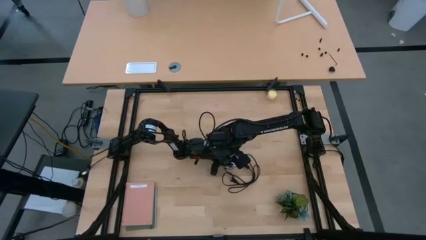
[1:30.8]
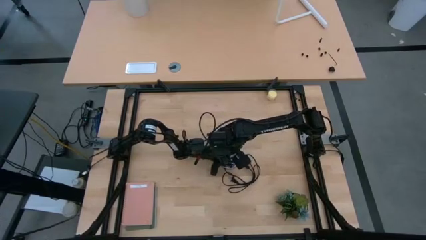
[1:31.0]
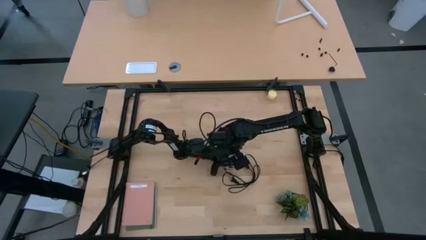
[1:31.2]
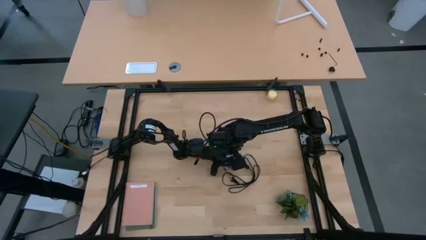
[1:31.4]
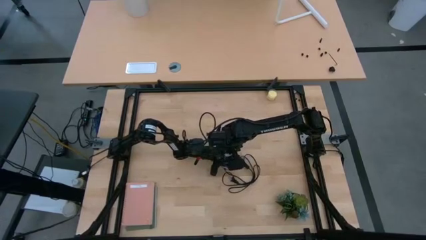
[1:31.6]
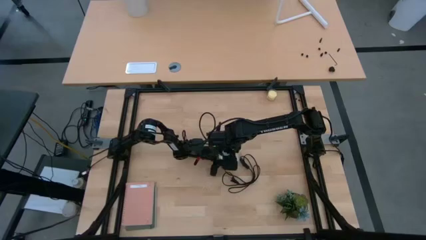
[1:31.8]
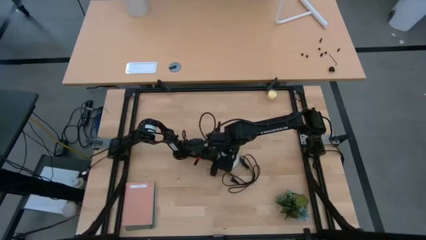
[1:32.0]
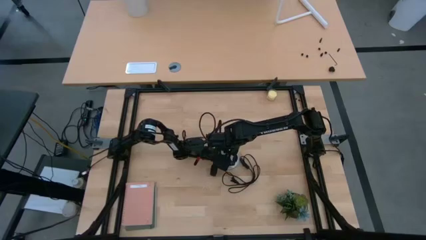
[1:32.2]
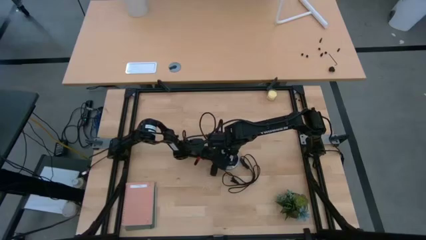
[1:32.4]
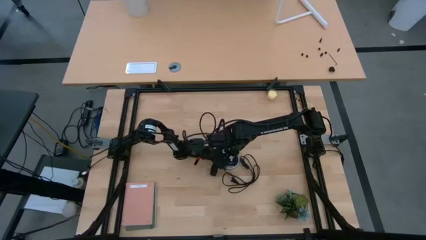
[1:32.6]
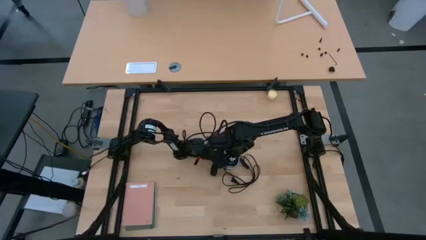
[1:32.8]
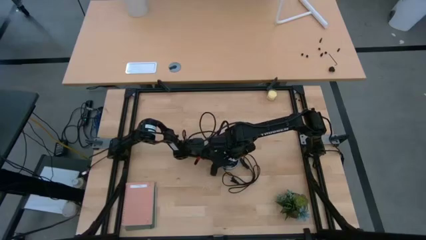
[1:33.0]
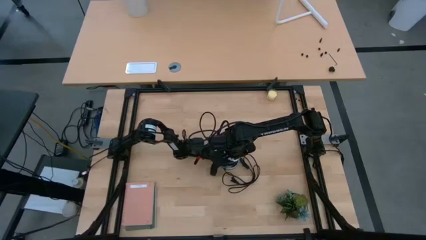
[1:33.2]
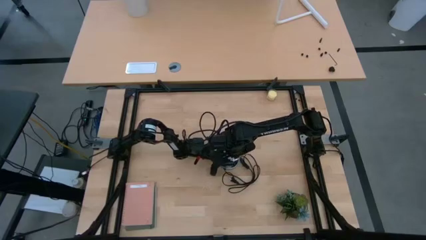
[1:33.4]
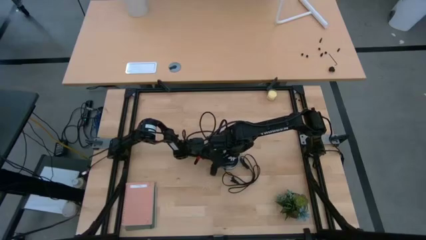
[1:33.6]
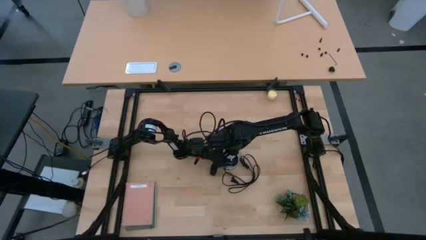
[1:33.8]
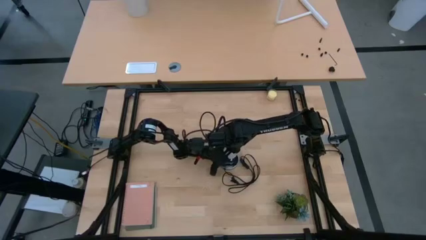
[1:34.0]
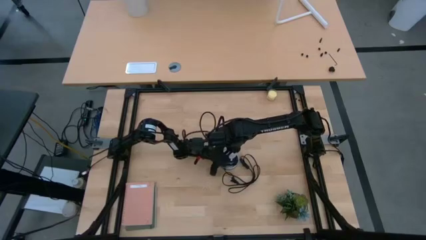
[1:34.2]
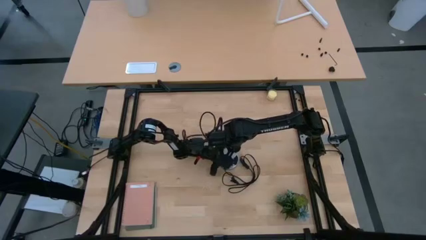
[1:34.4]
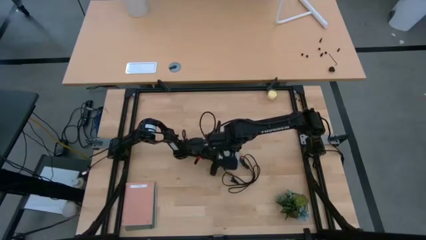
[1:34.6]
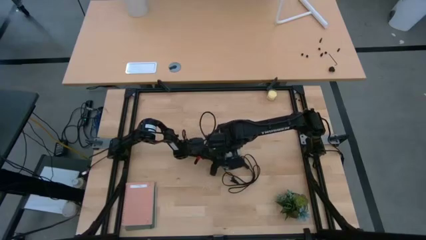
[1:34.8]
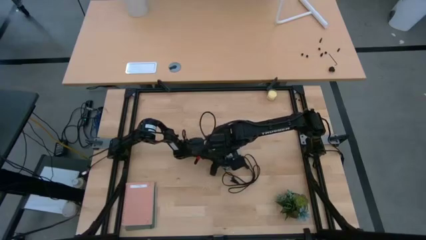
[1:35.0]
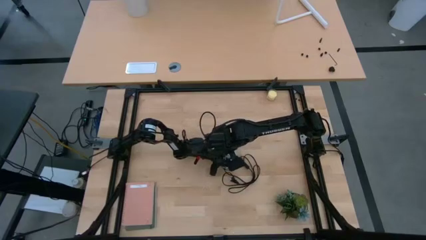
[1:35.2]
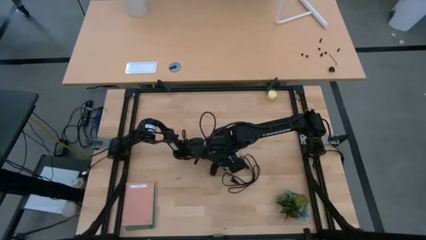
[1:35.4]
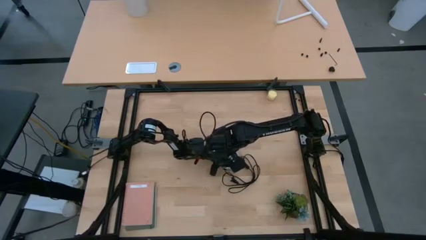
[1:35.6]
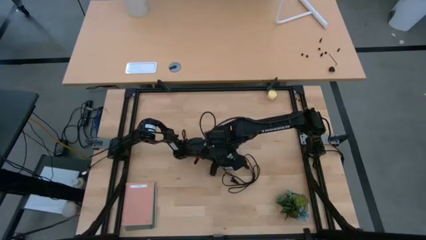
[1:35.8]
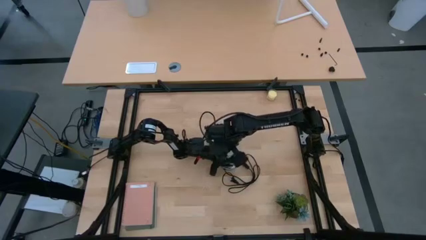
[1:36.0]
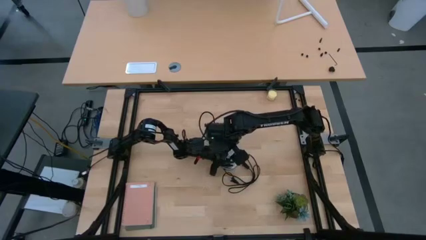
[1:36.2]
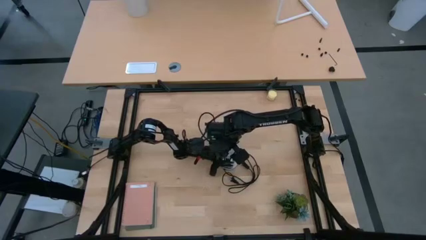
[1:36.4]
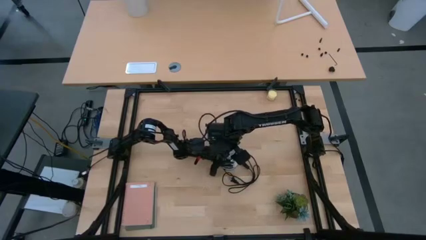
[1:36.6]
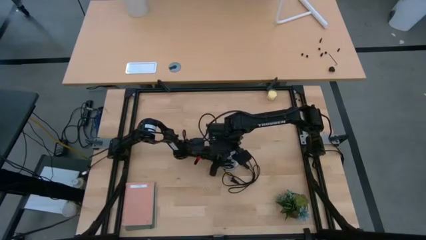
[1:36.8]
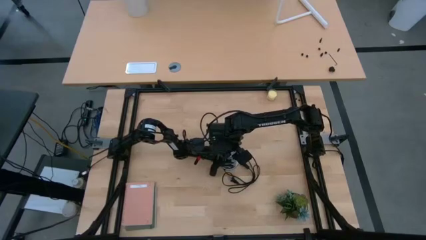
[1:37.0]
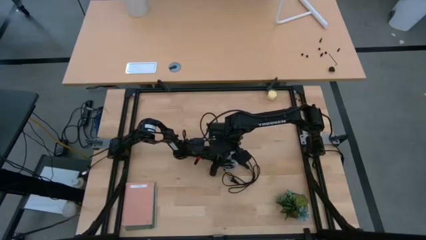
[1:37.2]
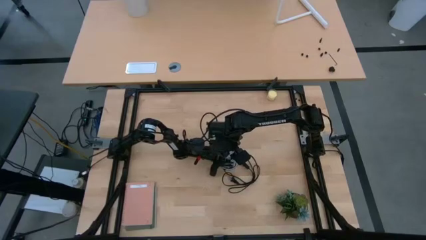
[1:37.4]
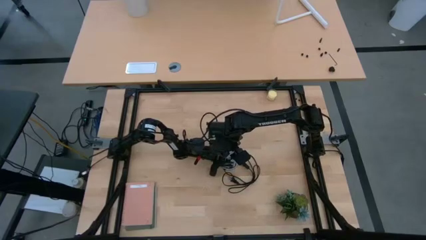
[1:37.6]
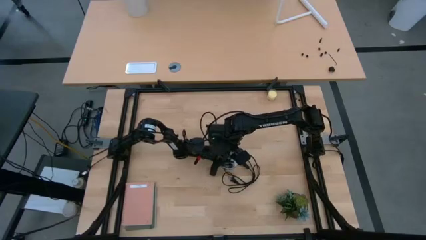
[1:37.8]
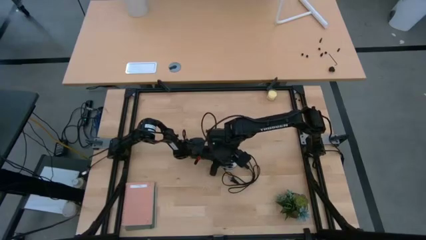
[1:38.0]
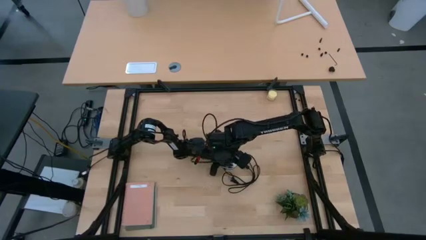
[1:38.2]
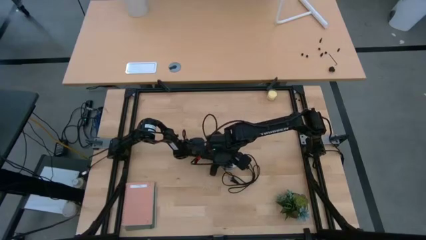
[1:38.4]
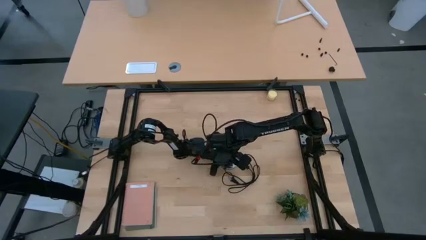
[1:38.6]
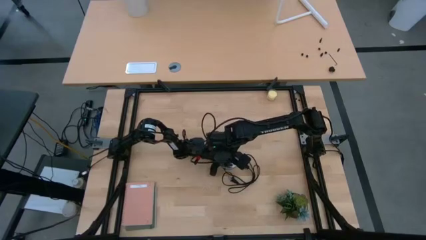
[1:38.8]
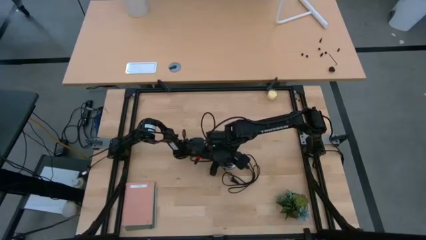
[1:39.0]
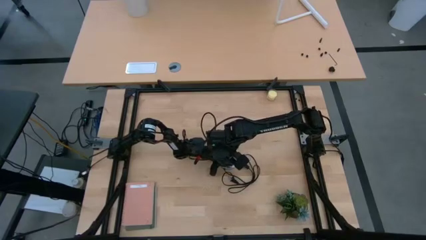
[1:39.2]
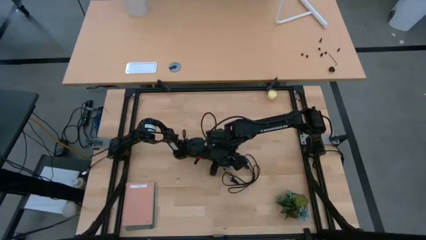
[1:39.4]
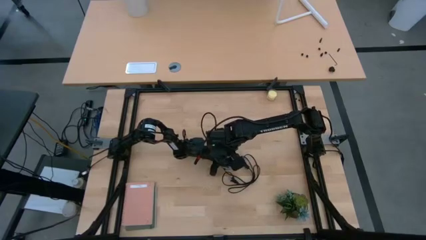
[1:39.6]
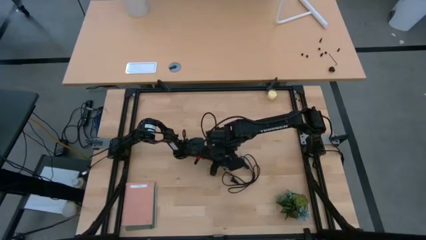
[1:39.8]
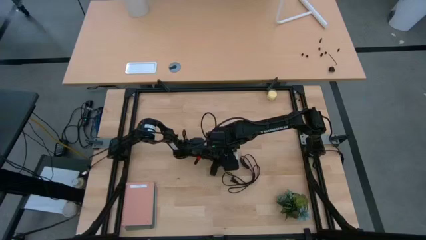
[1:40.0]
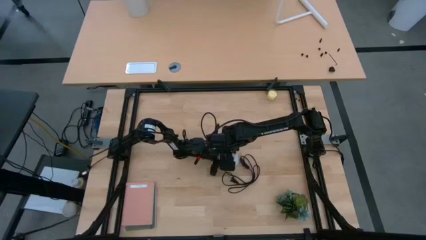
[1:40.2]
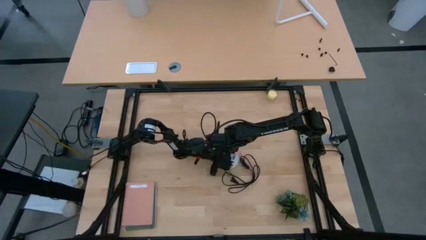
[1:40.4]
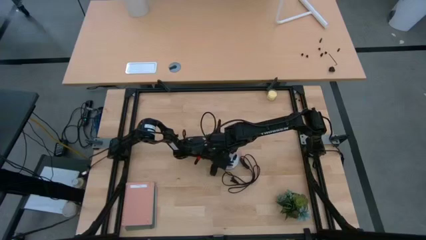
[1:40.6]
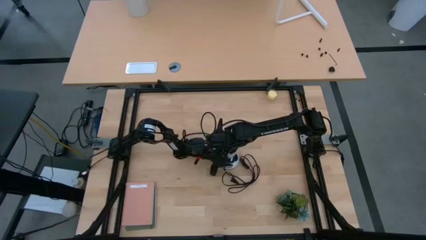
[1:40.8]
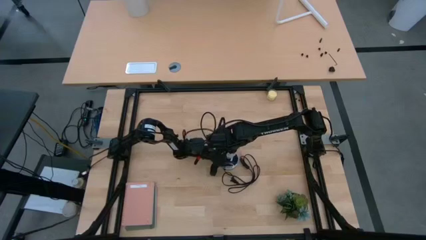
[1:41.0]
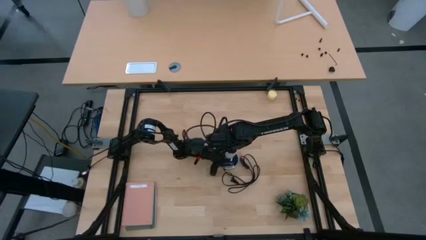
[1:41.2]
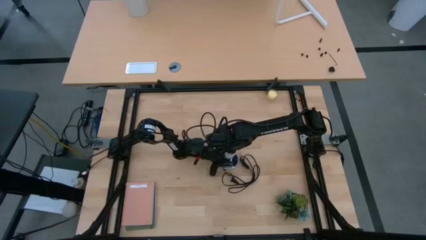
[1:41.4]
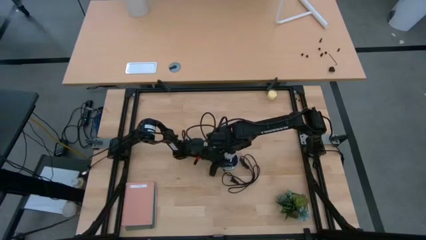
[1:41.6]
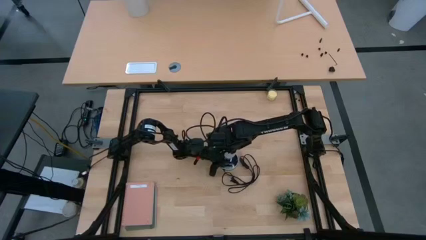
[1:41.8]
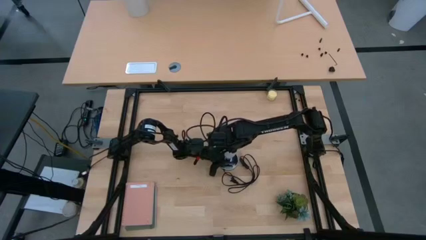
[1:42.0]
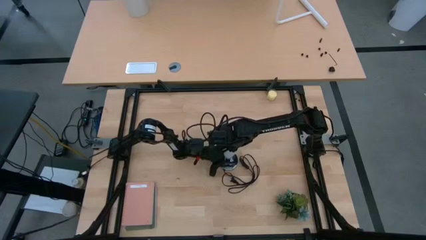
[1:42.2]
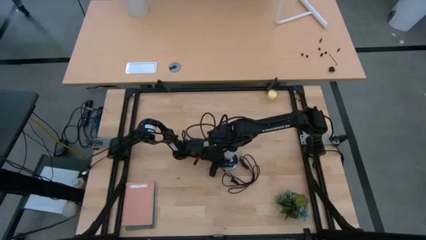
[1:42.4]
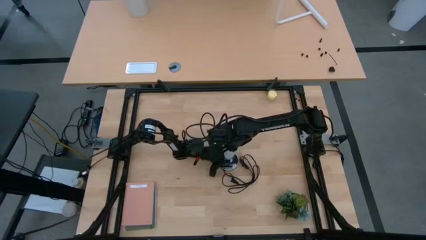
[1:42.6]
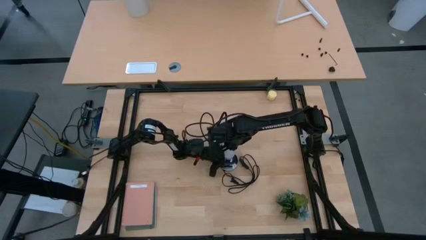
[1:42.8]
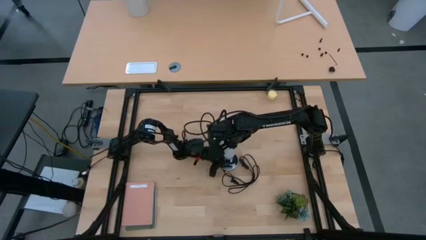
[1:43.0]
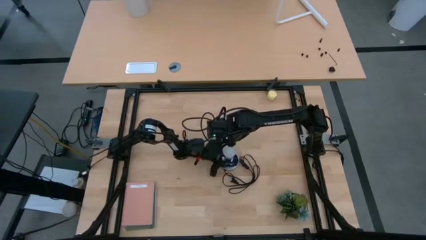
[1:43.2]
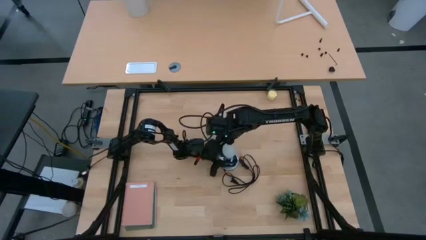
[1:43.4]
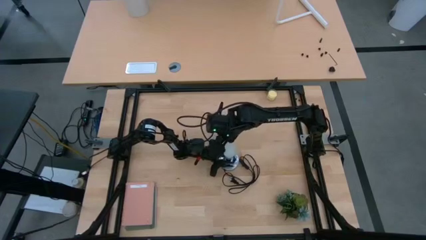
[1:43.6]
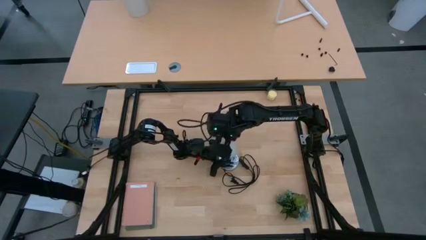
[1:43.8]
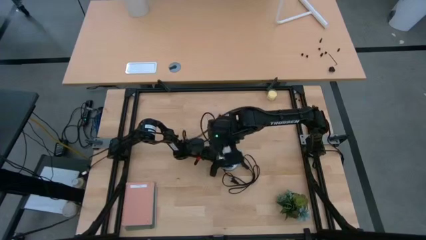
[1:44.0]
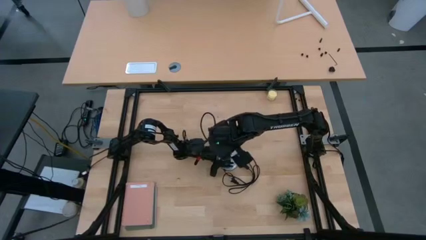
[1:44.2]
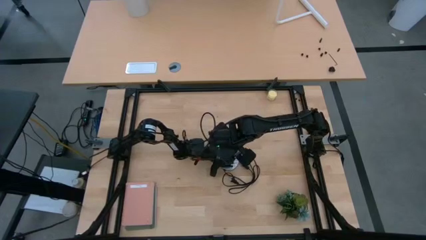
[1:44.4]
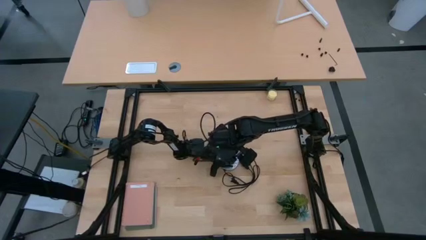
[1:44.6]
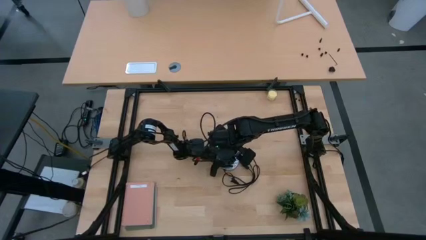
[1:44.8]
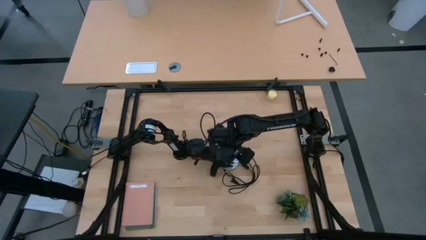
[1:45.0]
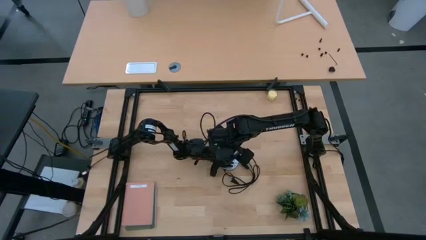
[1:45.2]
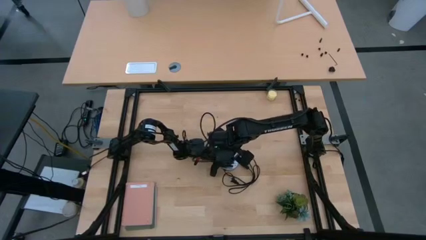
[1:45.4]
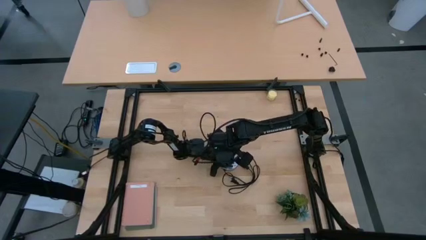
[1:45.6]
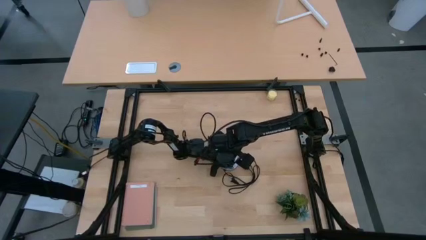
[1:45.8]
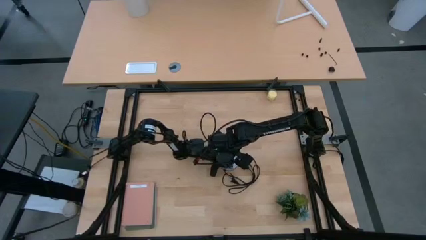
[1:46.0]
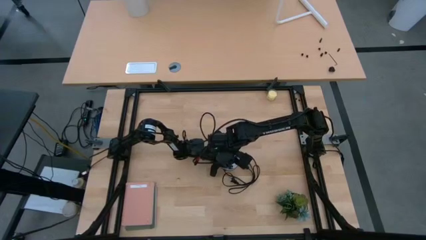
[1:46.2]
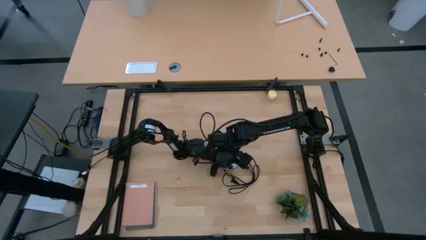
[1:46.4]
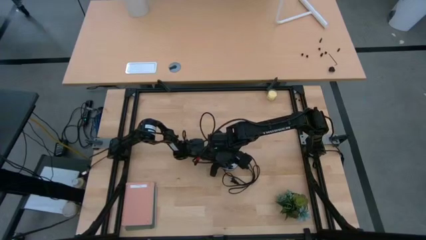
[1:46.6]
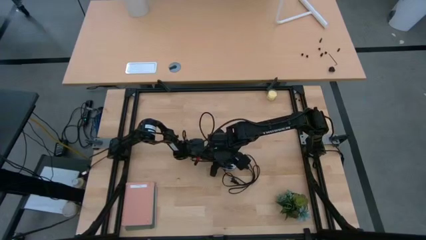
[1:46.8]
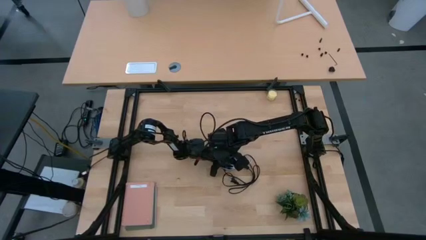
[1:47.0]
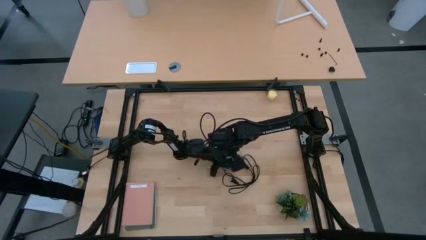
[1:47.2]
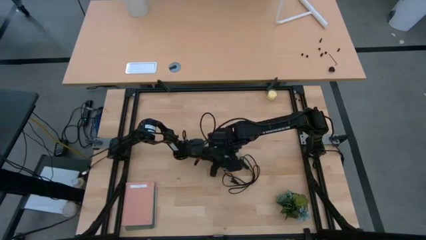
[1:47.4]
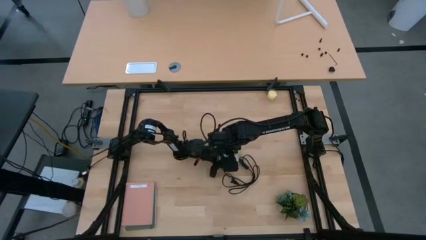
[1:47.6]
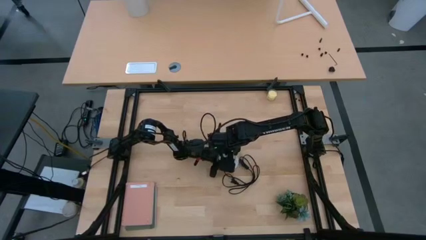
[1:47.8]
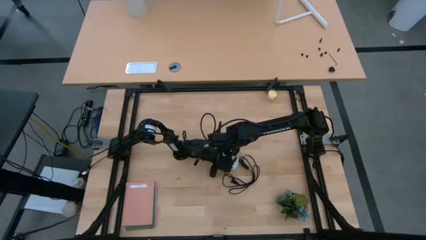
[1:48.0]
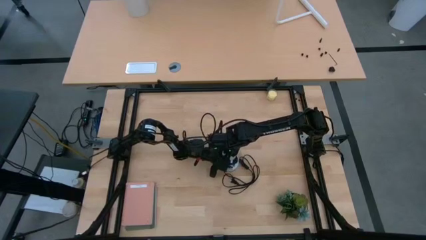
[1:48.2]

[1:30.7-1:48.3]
Task: Screw lightbulb
Insert the white lightbulb into the silver lamp
